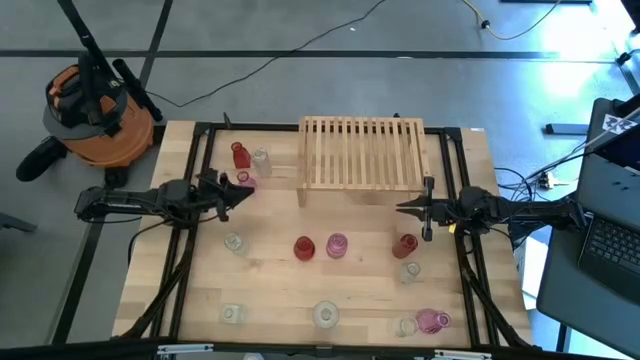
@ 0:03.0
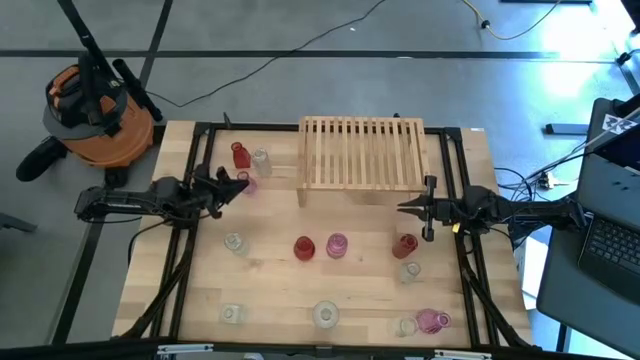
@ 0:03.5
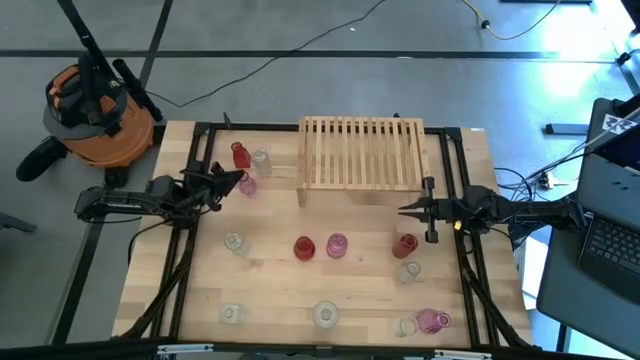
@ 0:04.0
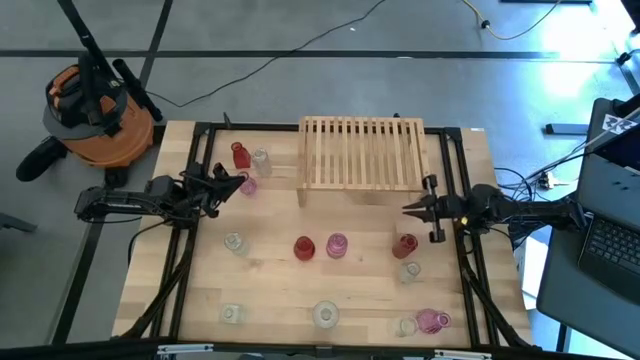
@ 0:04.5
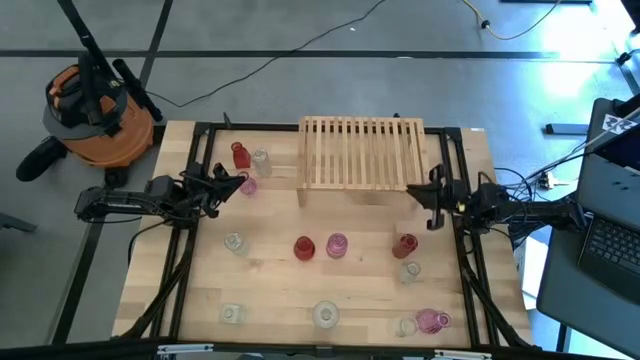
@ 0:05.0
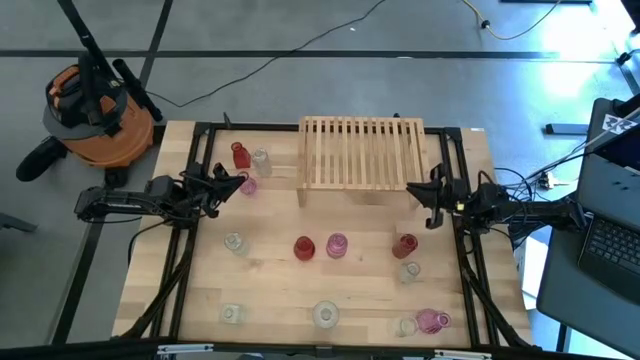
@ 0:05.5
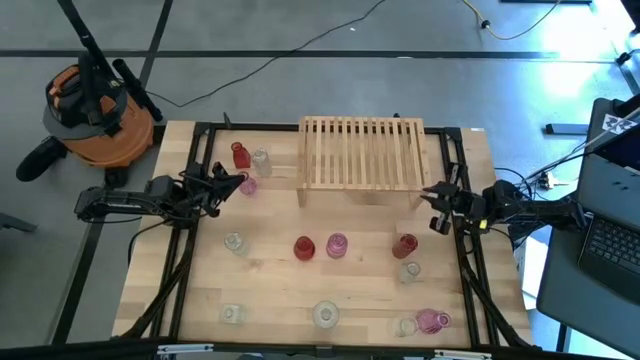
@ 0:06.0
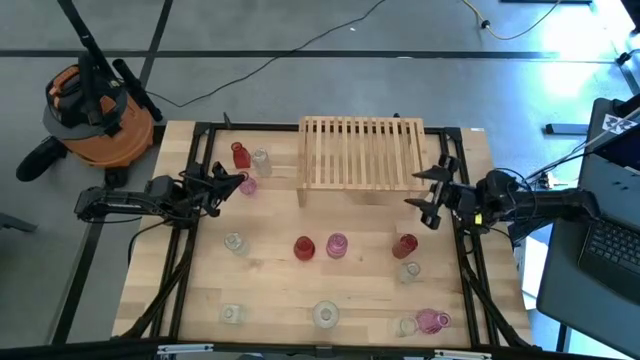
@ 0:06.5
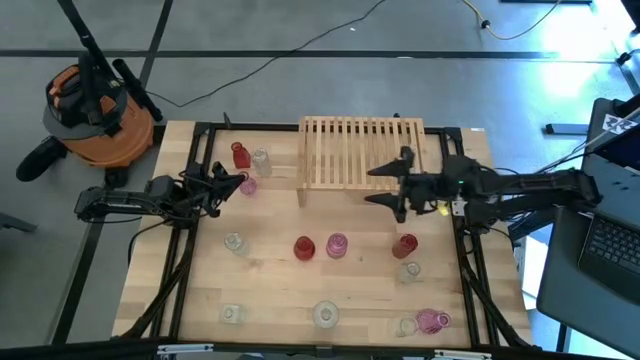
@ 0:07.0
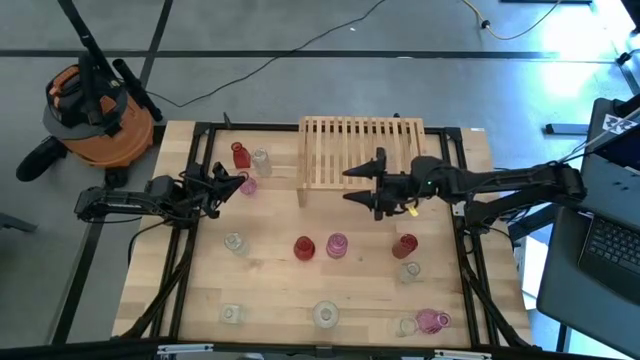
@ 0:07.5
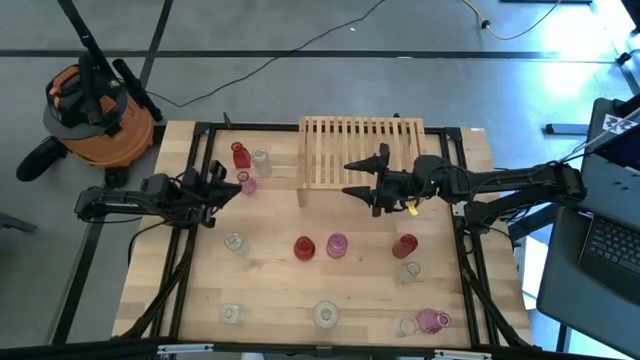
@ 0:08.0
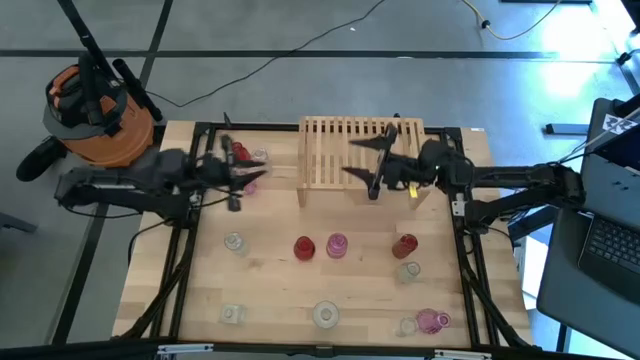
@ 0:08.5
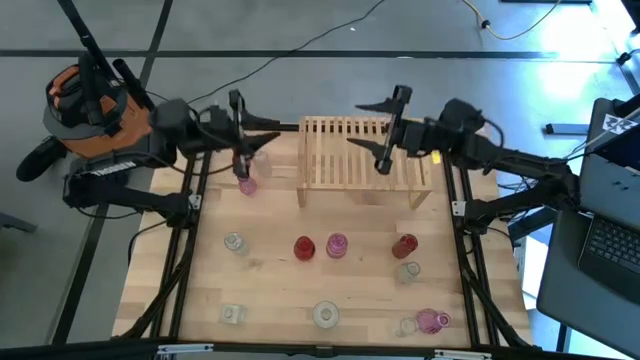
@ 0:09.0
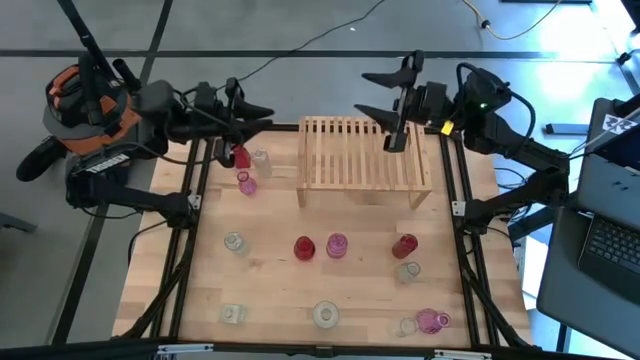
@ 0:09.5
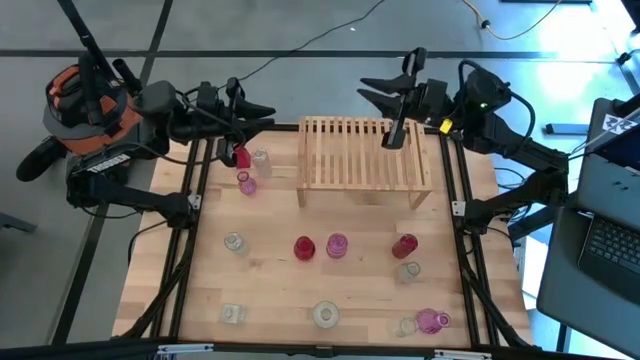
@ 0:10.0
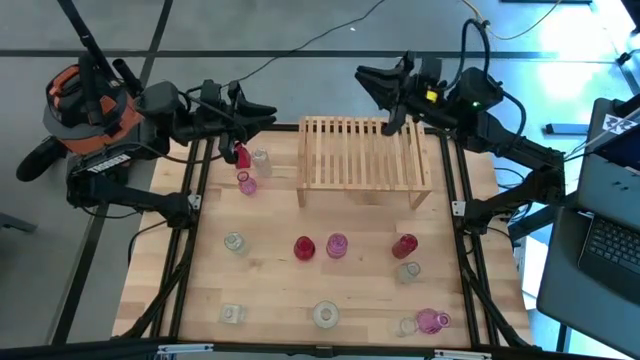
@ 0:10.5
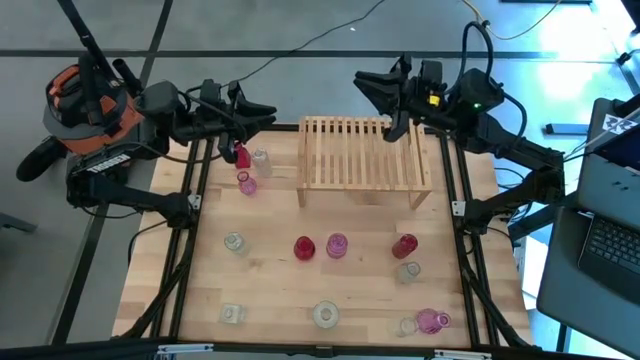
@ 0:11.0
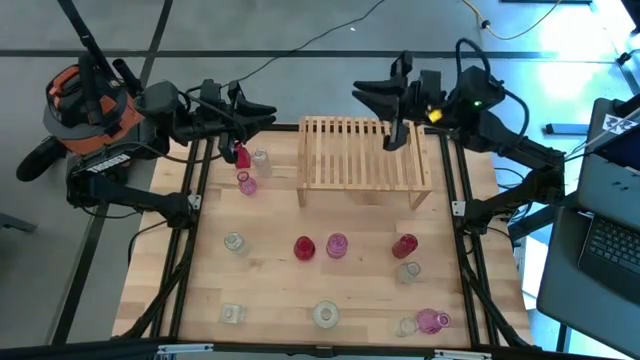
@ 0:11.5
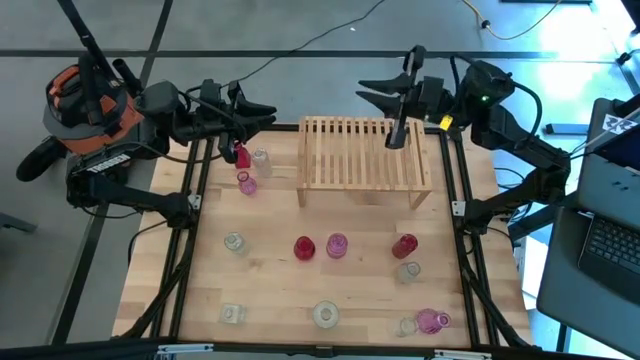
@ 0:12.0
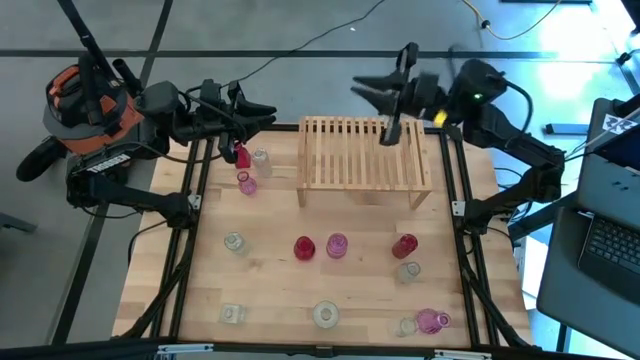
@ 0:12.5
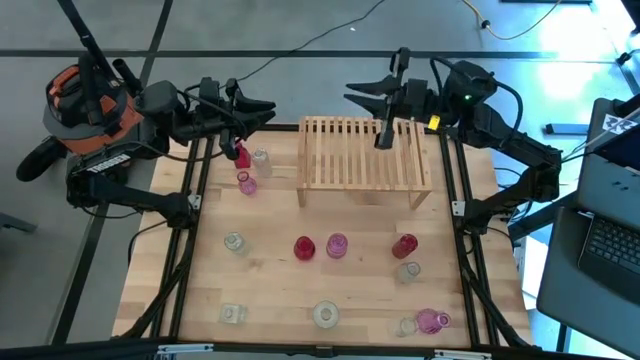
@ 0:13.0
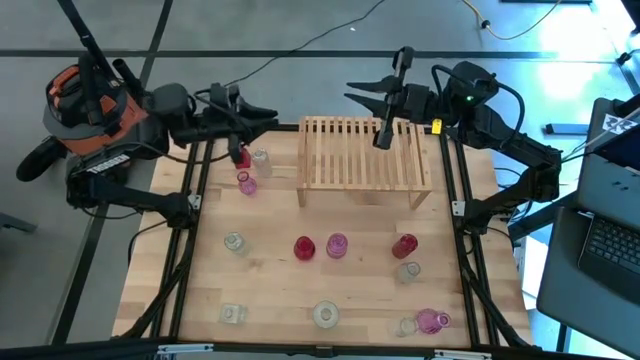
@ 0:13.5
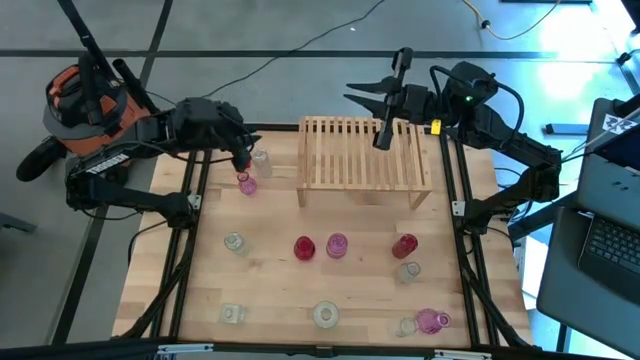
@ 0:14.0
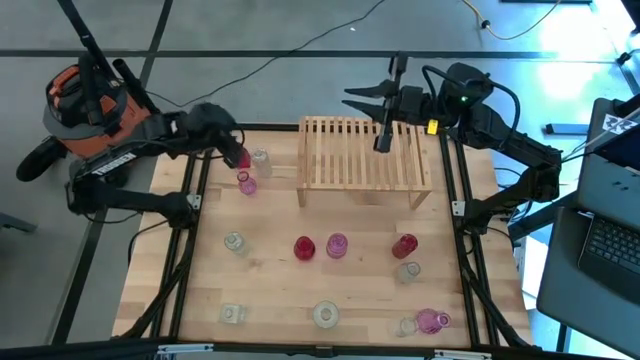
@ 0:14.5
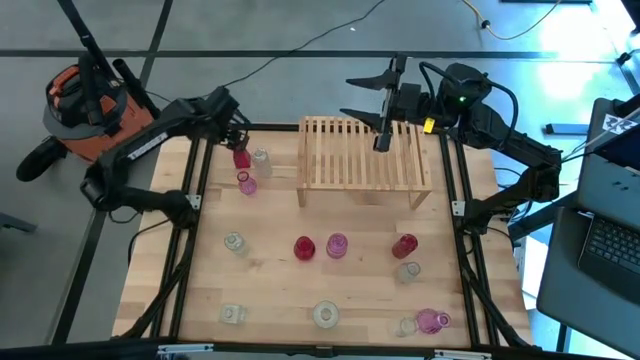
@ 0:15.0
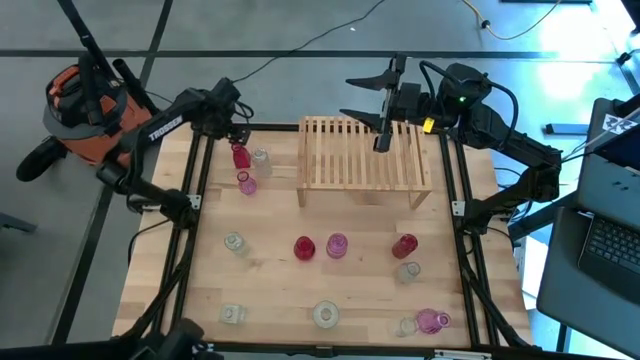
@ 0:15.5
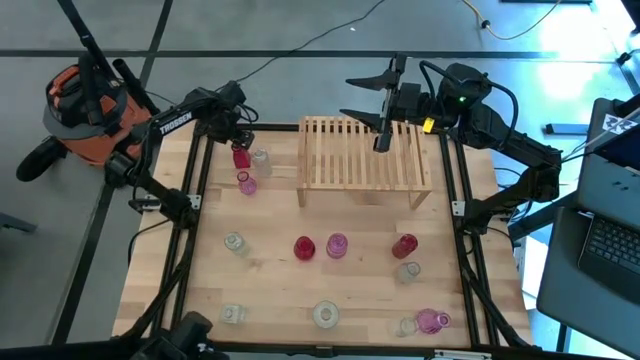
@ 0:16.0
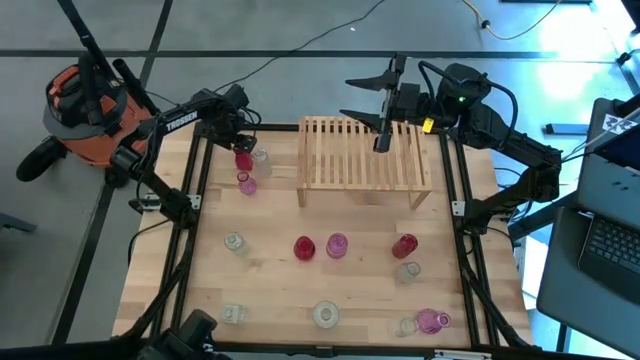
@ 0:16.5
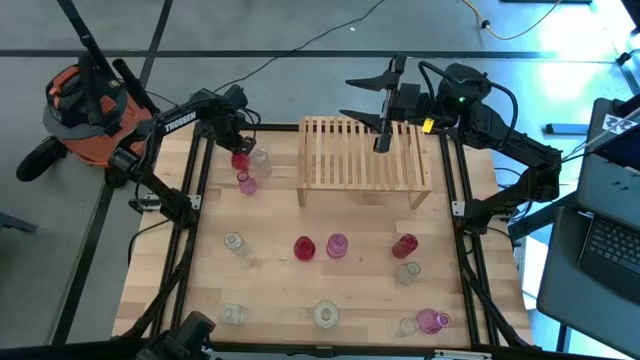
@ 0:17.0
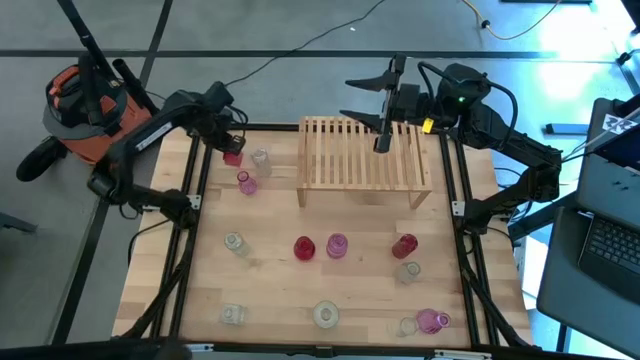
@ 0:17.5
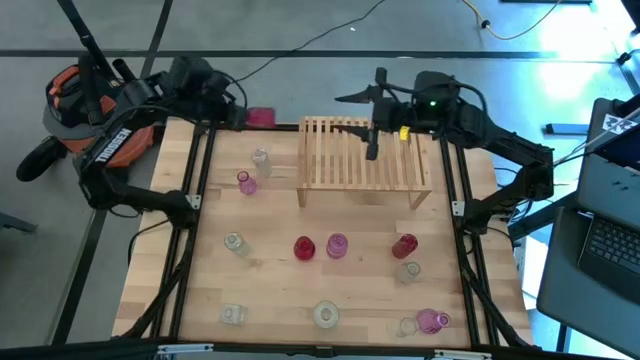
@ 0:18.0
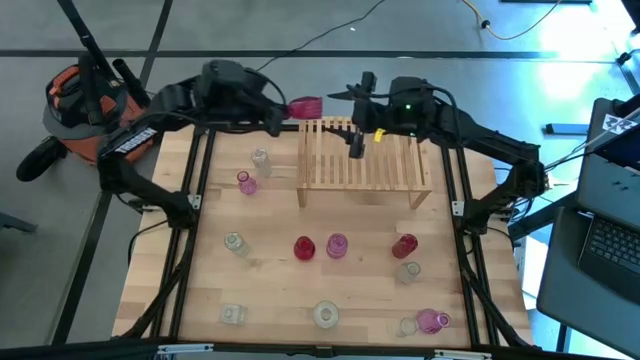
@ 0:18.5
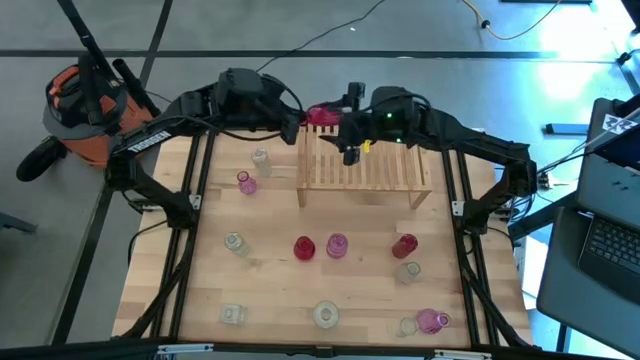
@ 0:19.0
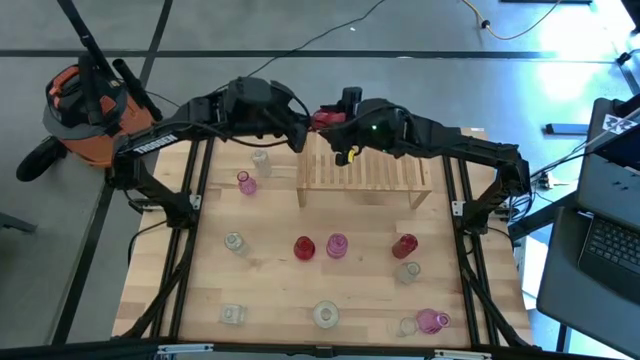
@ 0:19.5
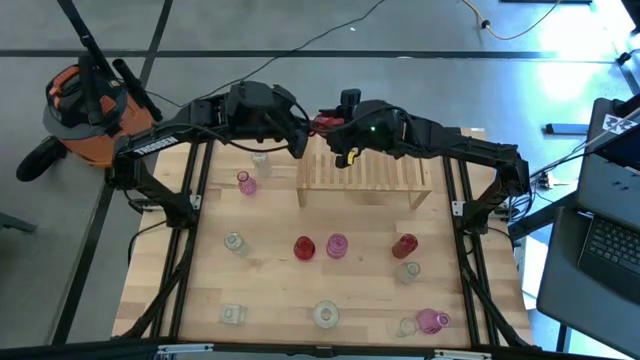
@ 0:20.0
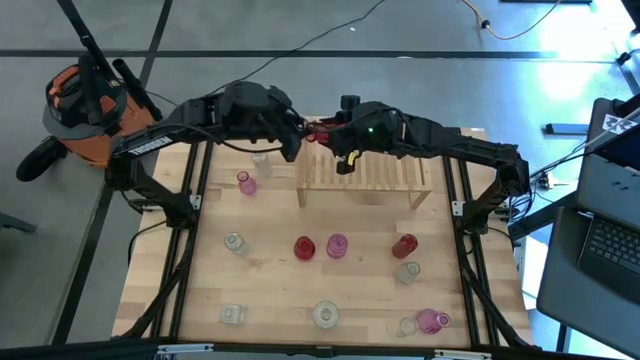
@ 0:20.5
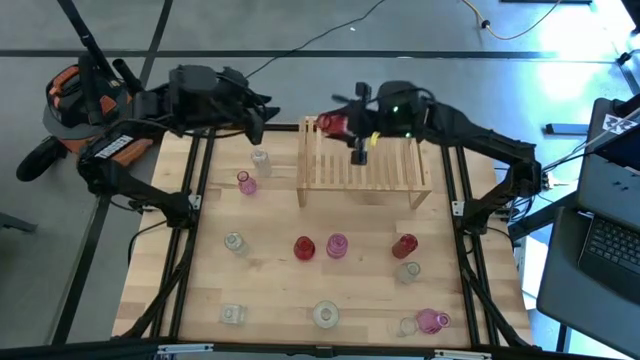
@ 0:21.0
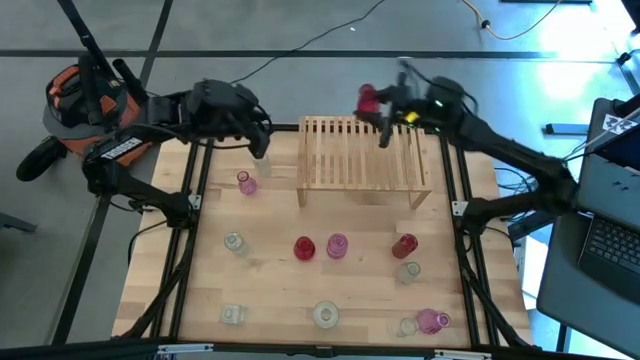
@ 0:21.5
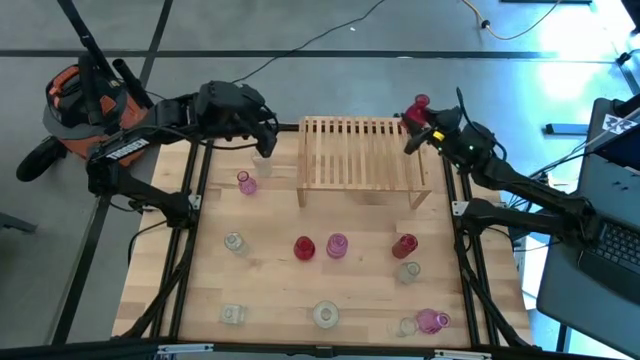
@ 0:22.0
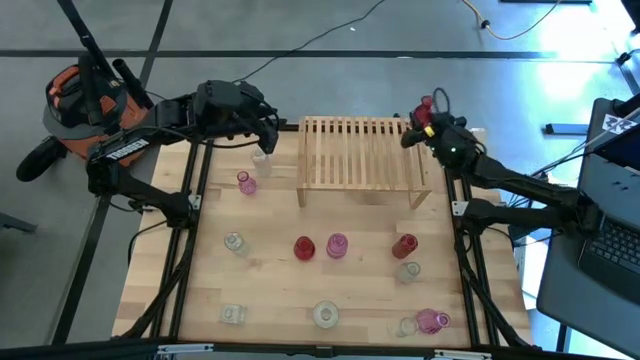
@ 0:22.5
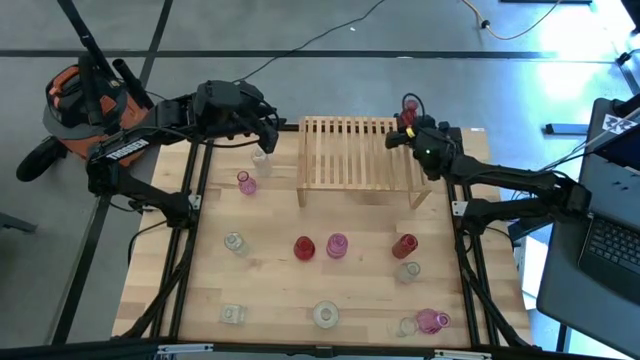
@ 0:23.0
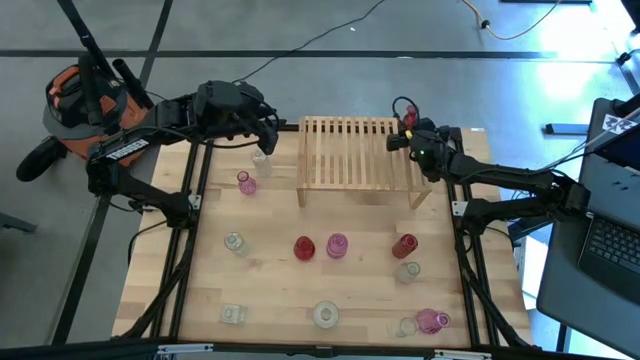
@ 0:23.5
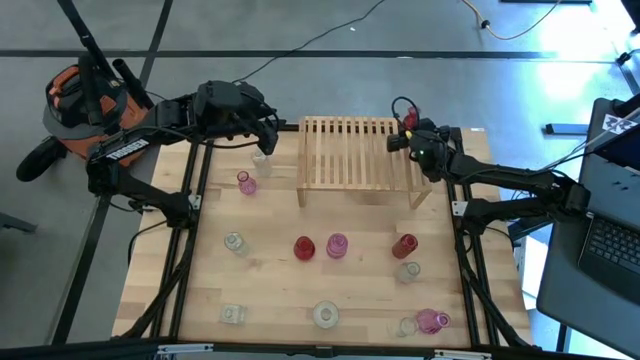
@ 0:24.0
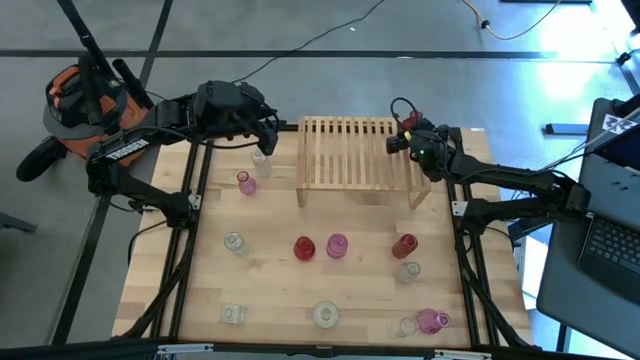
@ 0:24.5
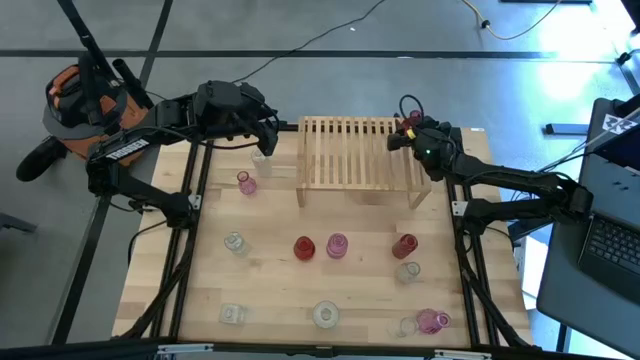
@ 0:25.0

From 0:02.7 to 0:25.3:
Task: sort vases onto shelf
Put the top right red vase on the shelf
